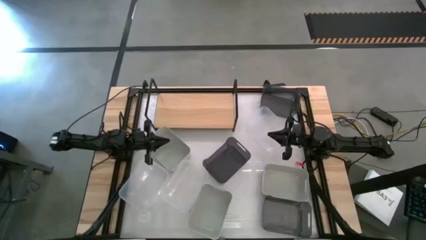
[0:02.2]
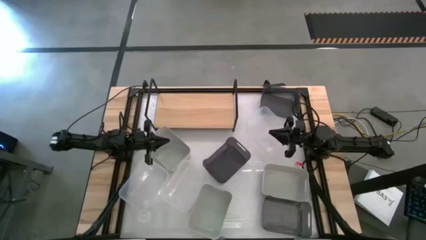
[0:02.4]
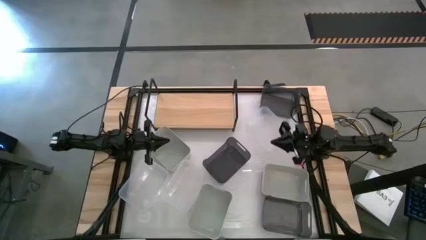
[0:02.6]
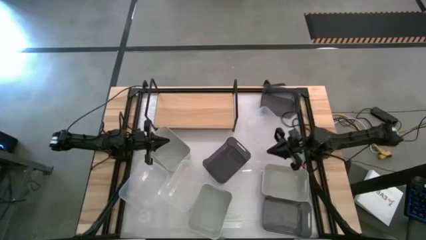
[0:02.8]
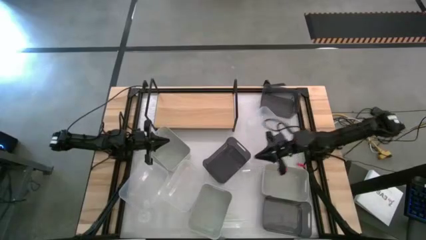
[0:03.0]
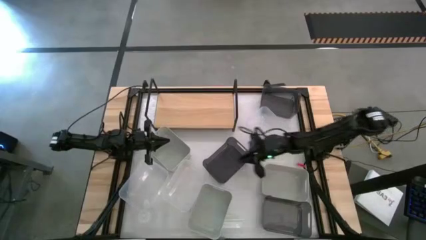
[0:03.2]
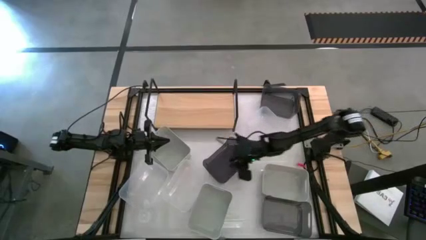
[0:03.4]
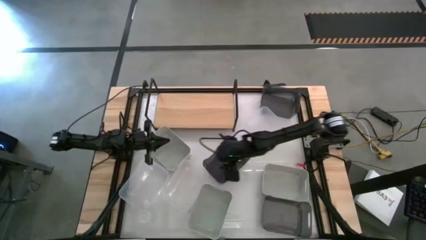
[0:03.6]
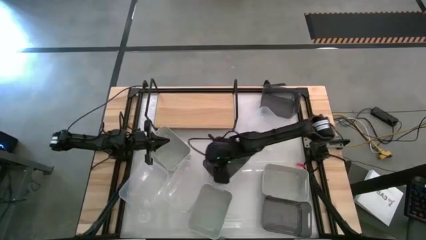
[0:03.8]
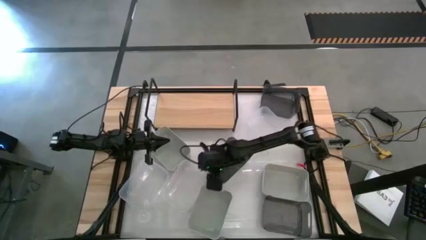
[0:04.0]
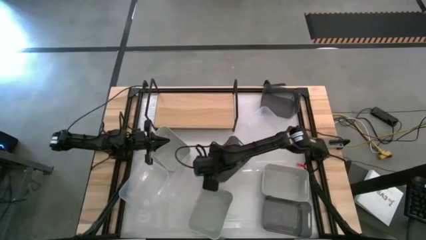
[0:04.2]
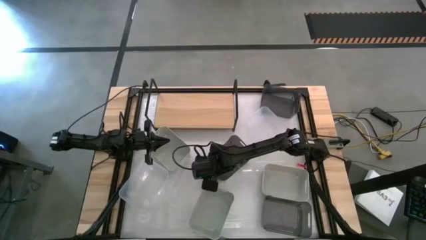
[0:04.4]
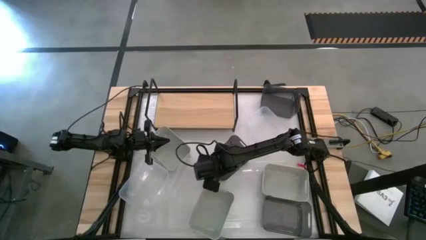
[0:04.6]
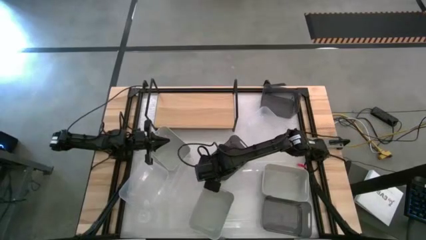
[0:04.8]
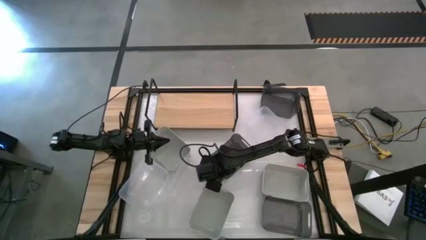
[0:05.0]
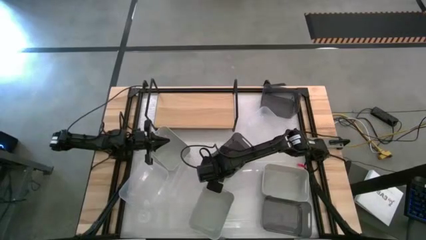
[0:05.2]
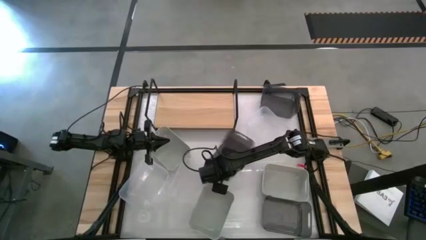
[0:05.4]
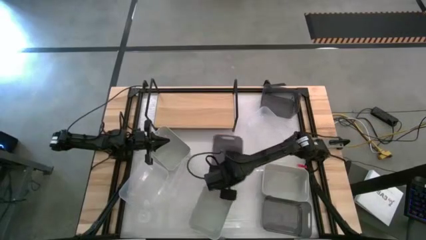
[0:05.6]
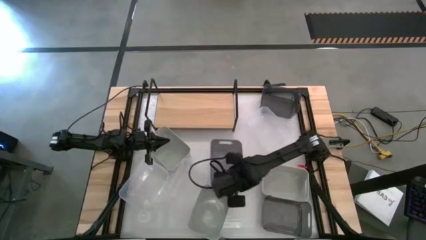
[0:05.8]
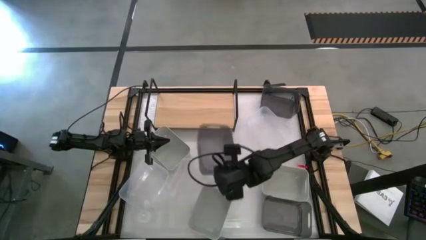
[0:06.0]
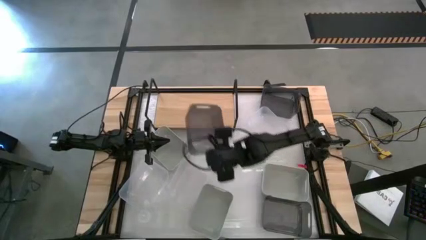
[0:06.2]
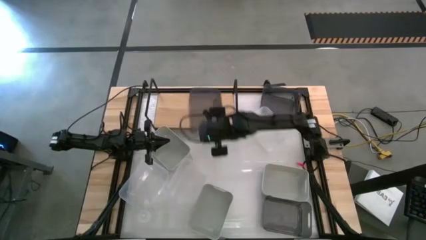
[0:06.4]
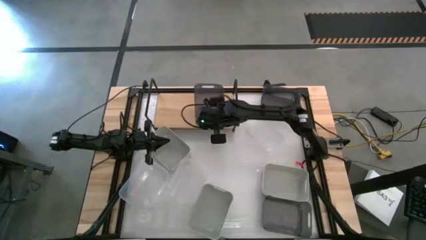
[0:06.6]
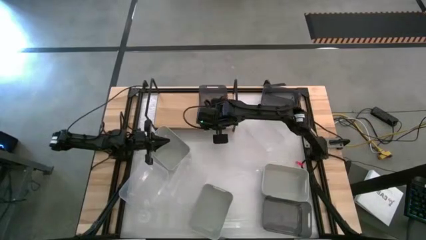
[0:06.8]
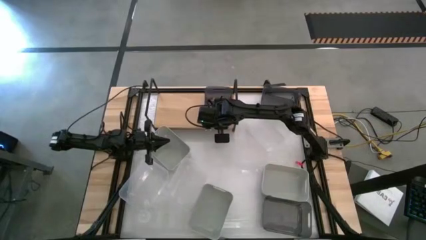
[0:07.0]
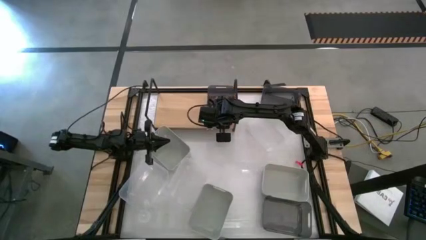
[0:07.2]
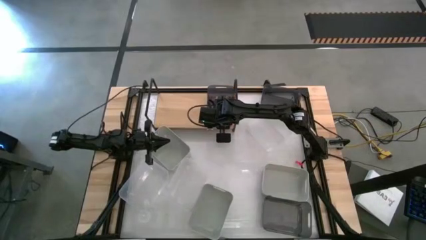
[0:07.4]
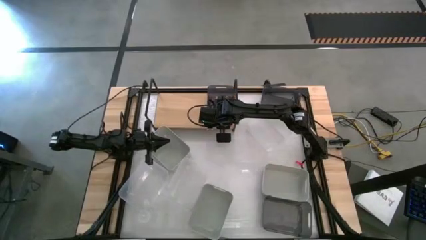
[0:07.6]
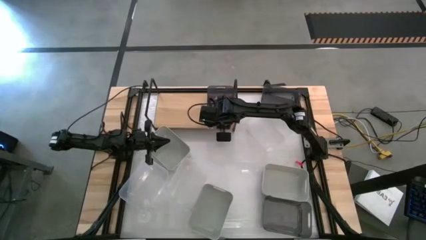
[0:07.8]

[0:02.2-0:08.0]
Task: Stack baskets on shelf by color
Put the left black bin on the shelf

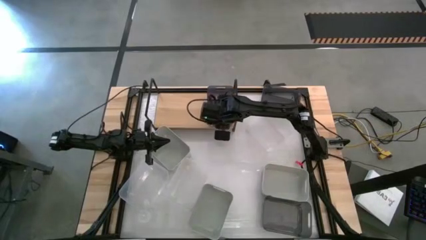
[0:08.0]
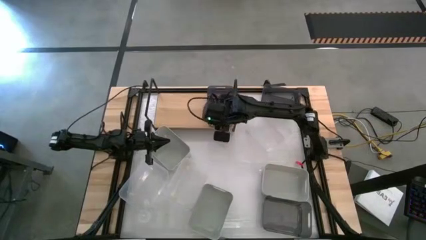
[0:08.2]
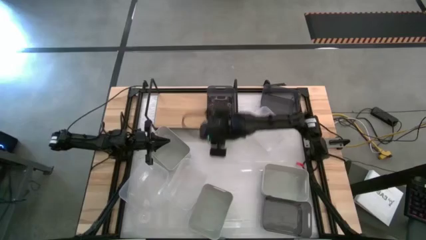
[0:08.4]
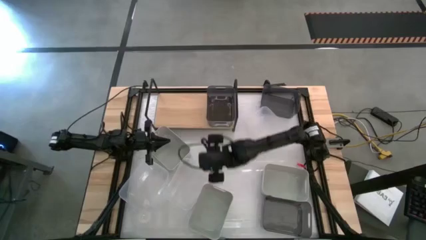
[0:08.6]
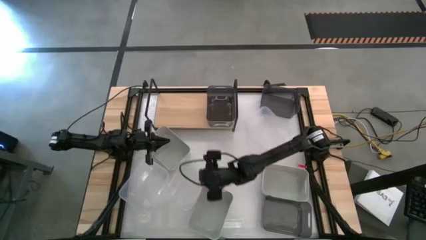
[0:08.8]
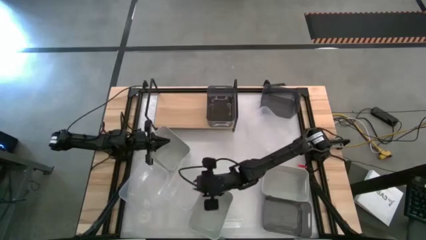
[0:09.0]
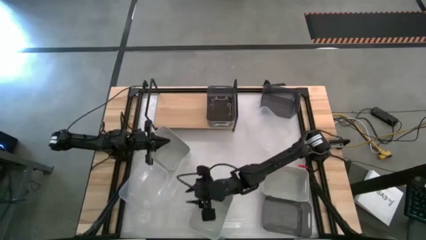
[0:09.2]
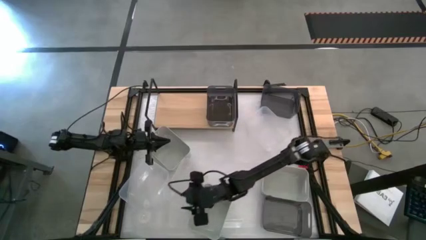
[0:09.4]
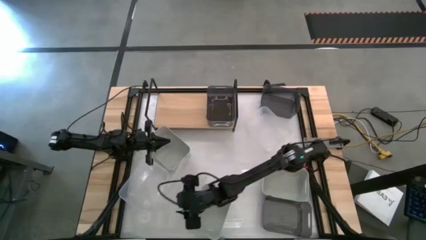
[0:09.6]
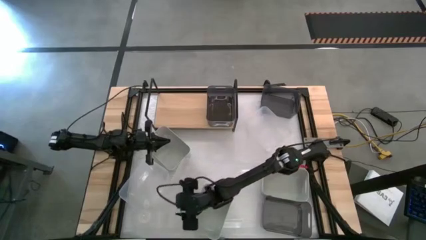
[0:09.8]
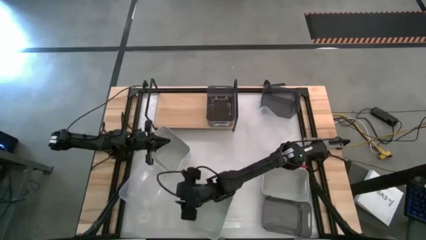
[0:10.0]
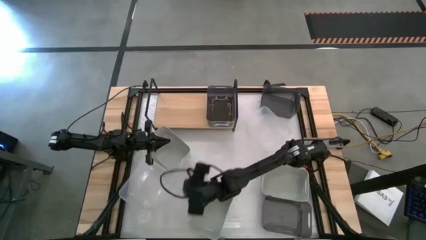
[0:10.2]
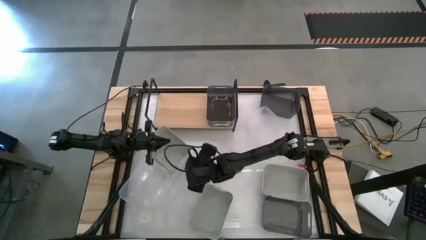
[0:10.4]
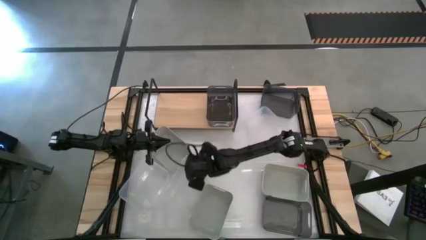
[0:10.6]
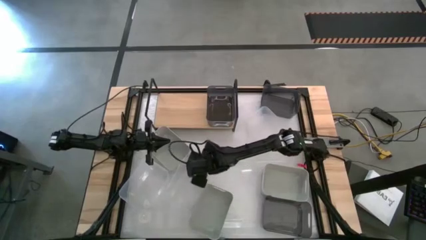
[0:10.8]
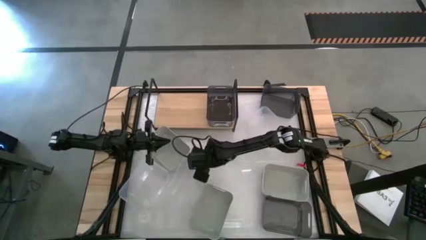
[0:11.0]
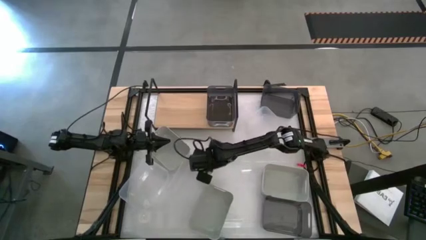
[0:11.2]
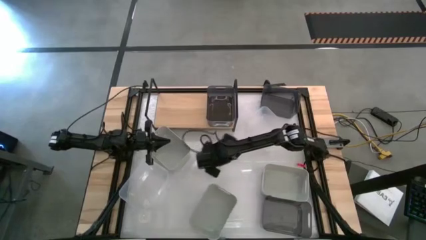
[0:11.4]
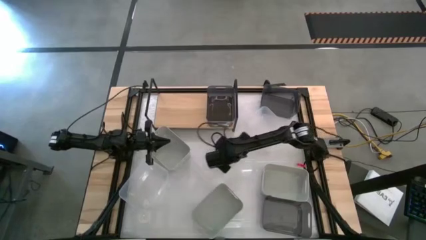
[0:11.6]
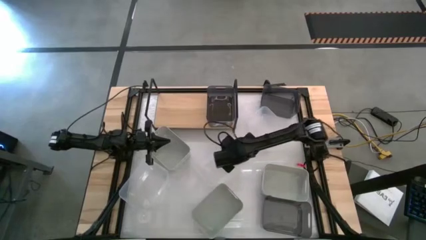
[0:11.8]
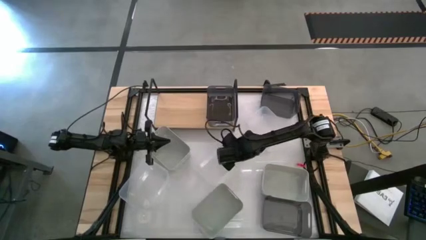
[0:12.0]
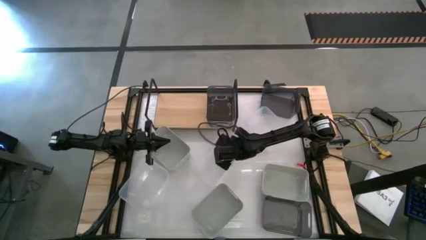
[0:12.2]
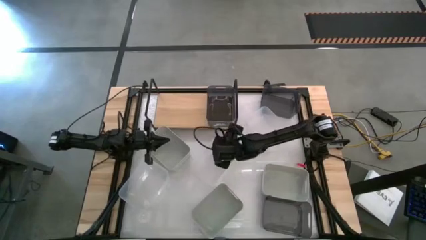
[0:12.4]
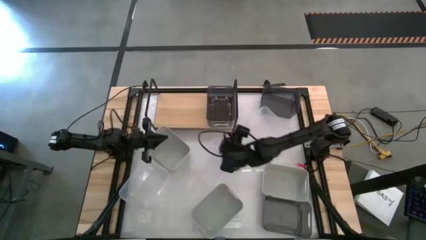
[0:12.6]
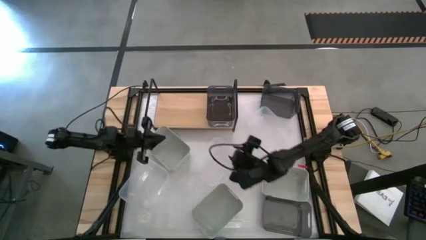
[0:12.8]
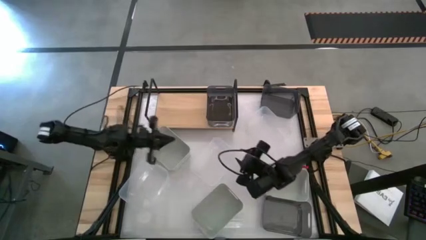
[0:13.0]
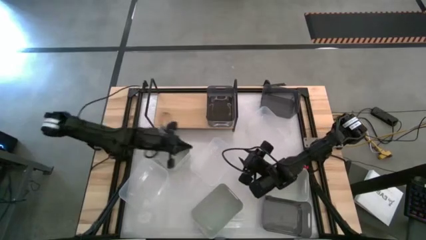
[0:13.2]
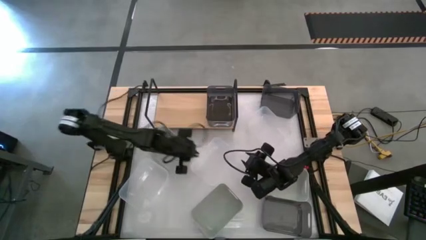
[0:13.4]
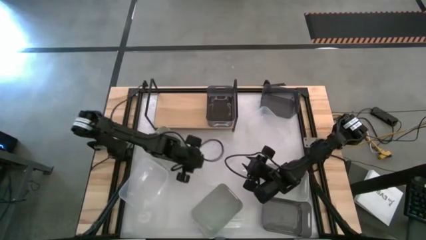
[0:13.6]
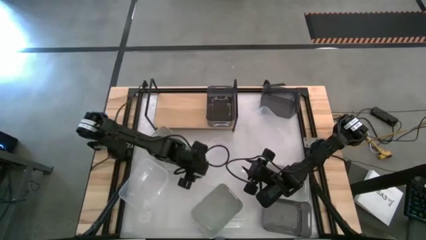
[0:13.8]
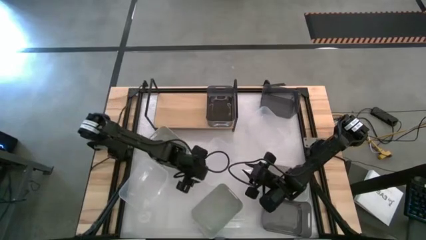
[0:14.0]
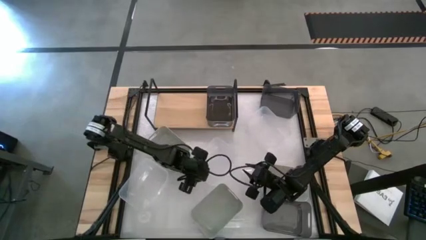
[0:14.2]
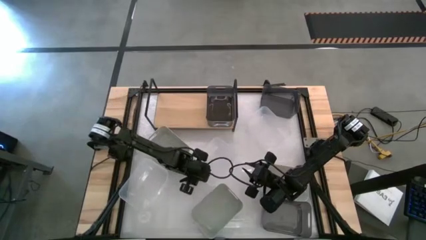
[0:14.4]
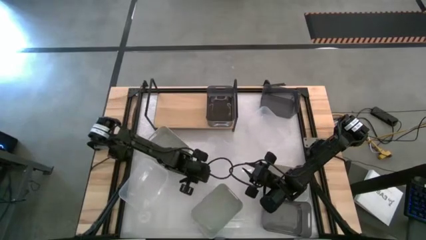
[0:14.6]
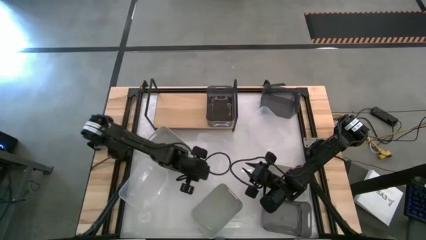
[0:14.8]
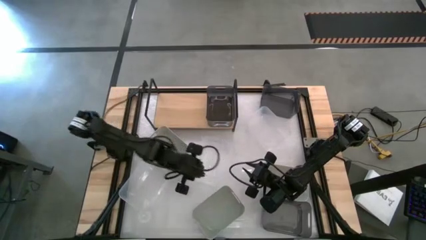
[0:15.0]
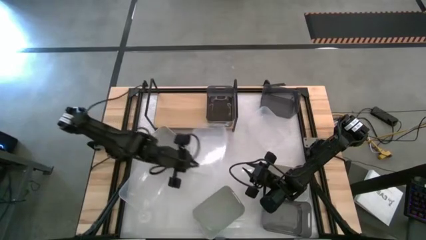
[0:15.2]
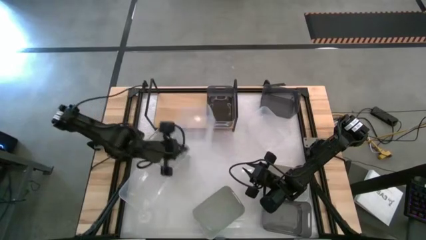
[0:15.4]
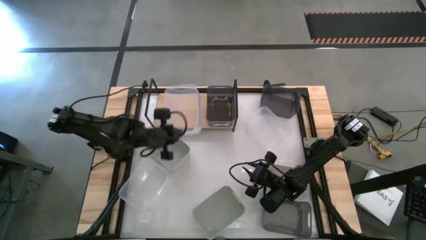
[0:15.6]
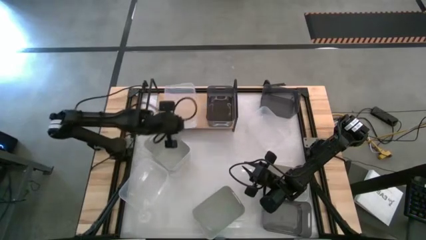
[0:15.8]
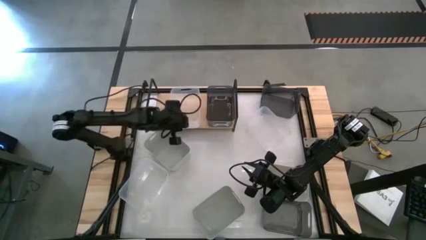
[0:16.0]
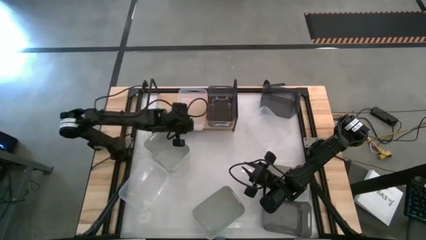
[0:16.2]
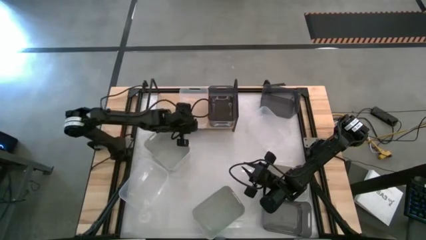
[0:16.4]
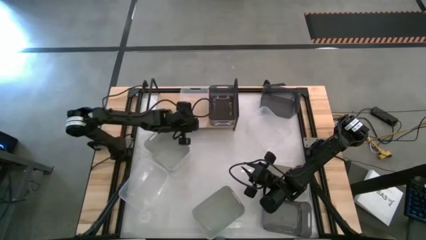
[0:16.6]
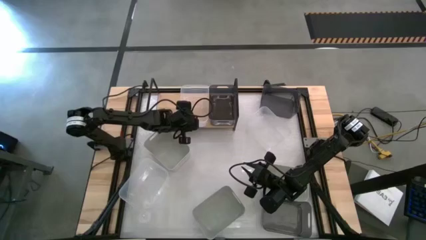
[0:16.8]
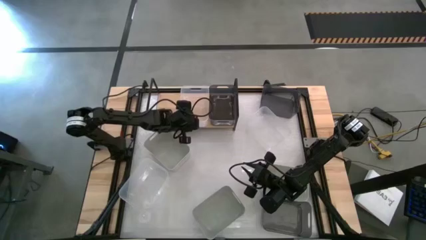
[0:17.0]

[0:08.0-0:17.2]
Put the middle transparent bin on the shelf

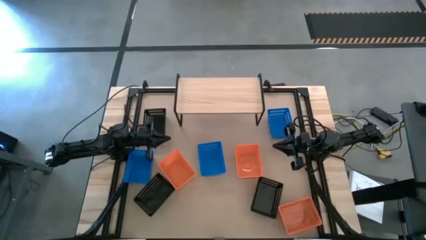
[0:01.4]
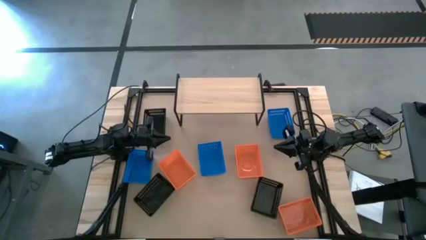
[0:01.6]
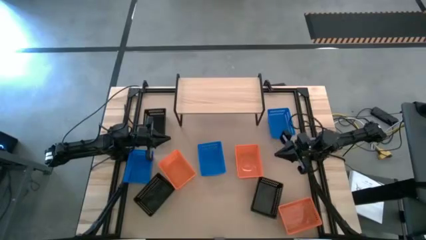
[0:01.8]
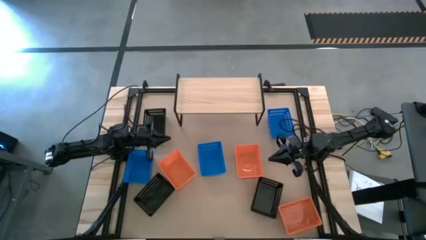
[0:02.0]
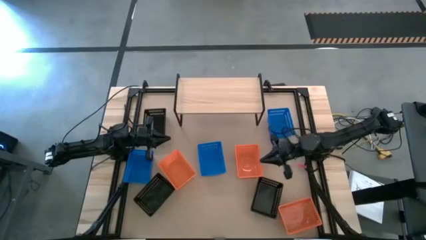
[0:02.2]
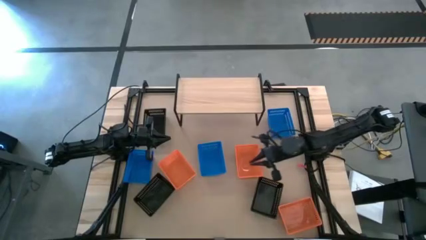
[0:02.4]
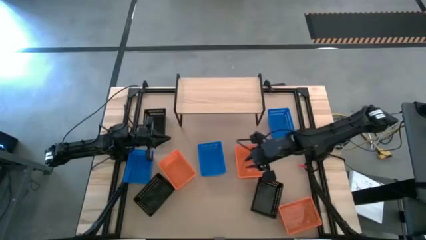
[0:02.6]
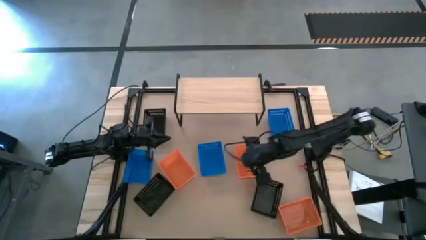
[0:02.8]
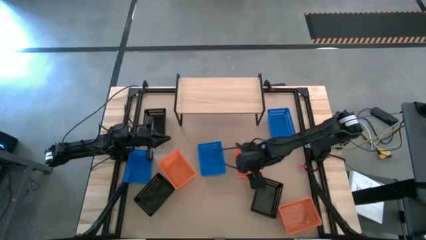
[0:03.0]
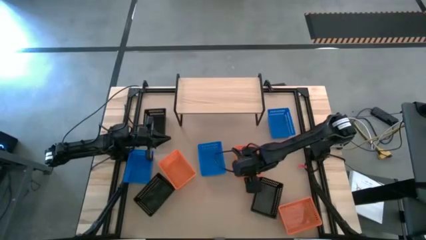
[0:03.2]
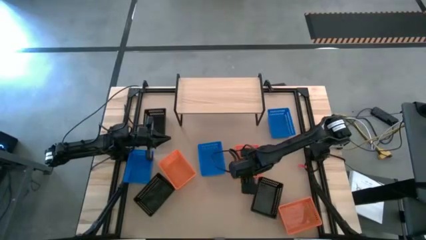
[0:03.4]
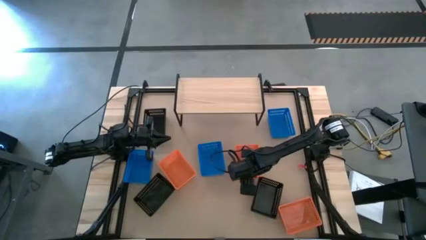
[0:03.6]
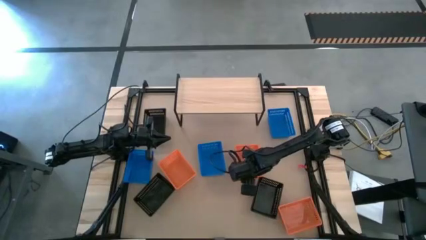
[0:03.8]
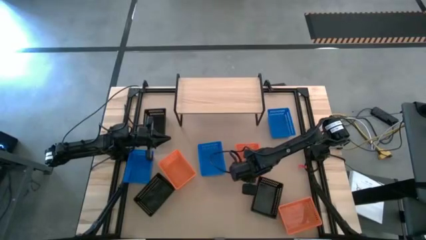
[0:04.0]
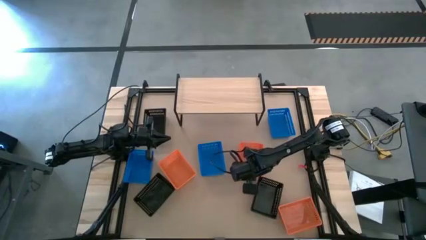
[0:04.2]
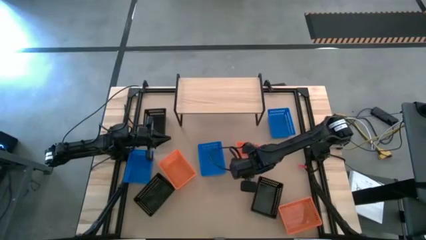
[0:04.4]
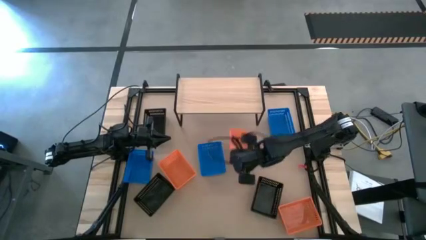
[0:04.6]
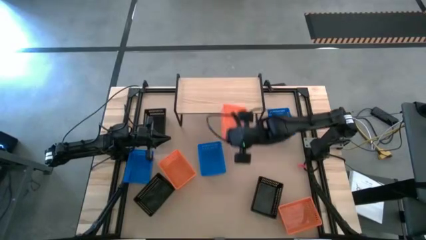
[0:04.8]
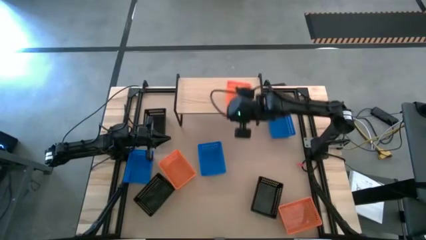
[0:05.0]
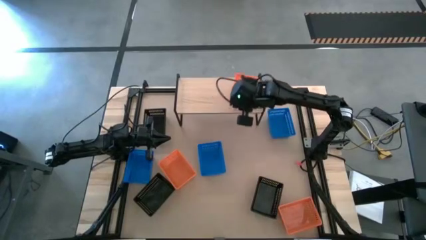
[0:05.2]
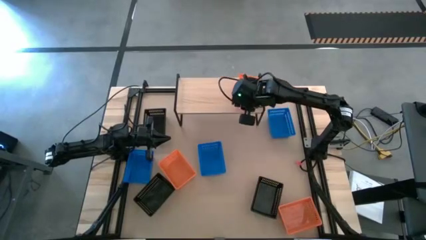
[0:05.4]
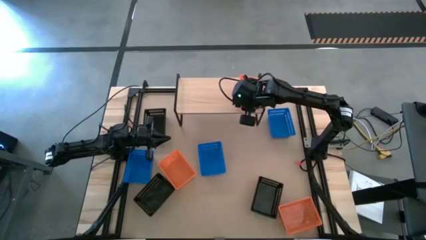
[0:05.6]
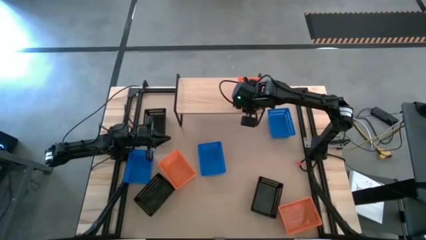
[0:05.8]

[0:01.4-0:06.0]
Task: Stack baskets on shelf by color
Put the middle orange bin on the shelf
